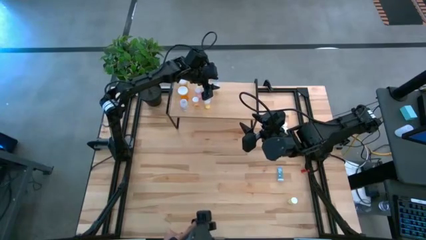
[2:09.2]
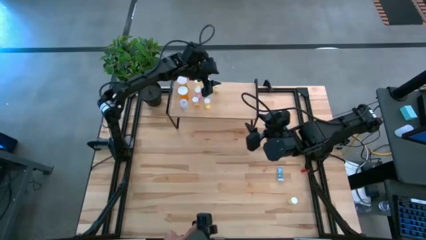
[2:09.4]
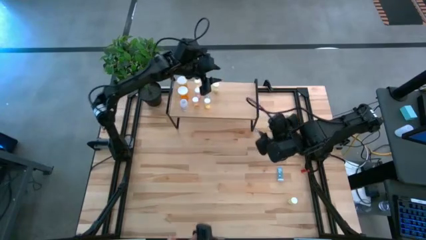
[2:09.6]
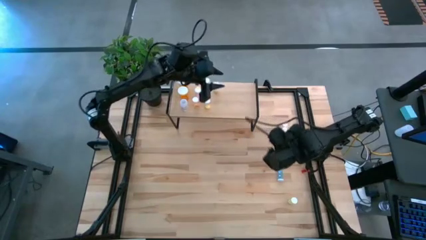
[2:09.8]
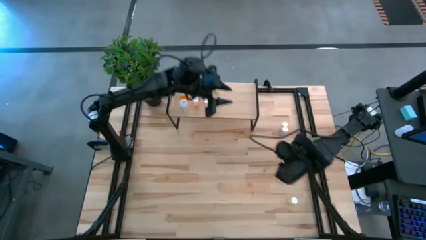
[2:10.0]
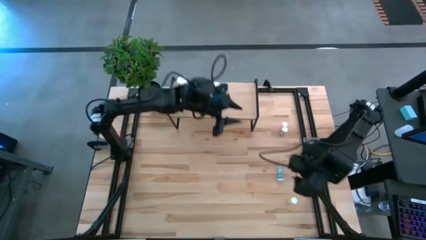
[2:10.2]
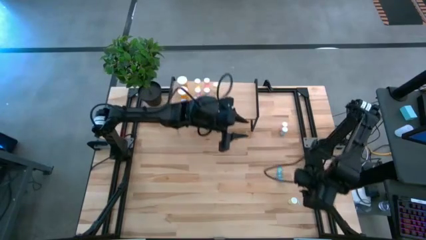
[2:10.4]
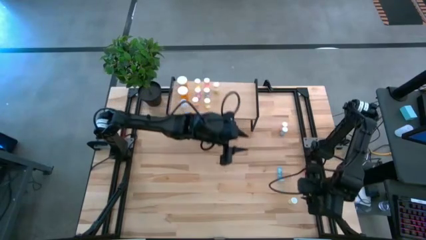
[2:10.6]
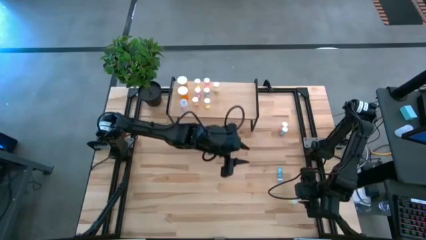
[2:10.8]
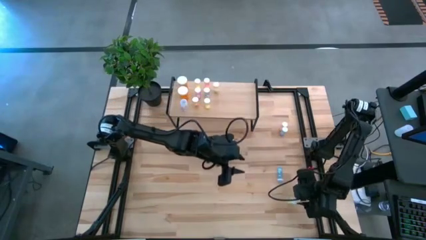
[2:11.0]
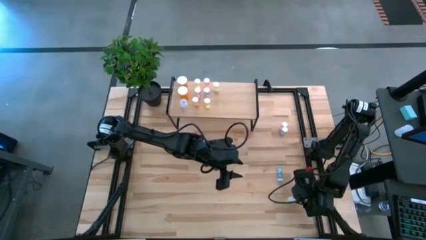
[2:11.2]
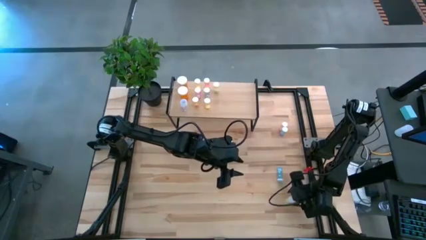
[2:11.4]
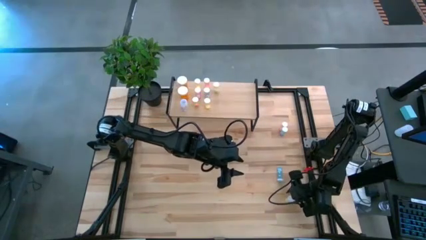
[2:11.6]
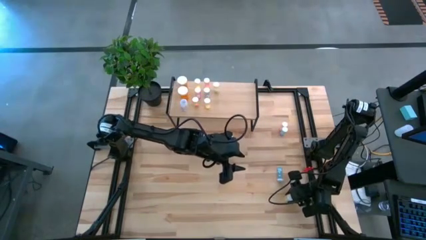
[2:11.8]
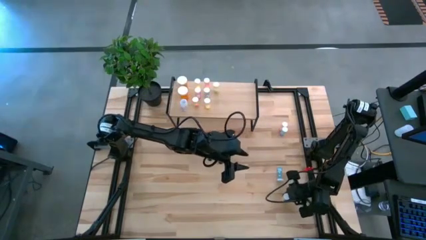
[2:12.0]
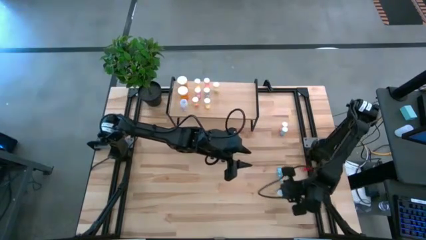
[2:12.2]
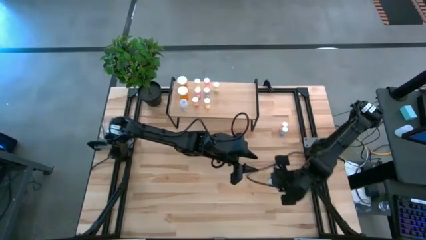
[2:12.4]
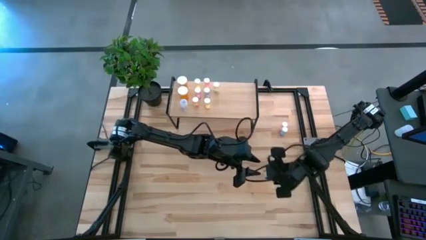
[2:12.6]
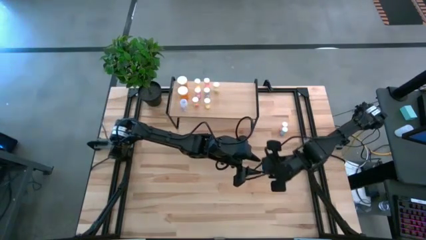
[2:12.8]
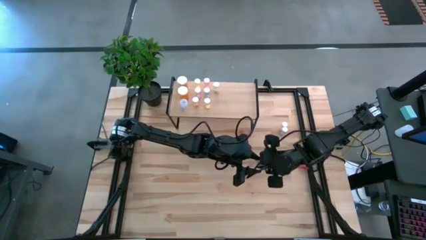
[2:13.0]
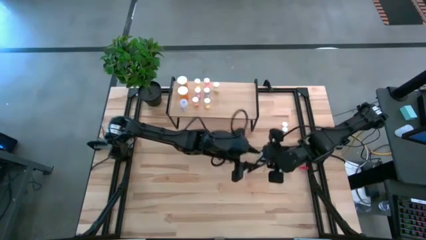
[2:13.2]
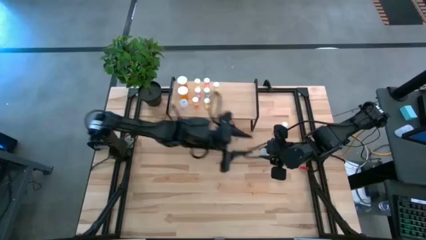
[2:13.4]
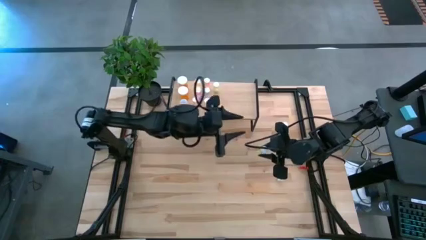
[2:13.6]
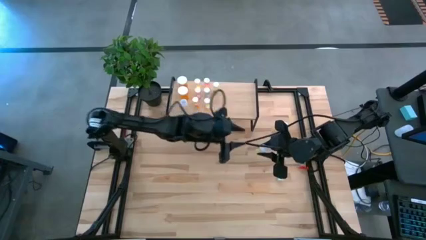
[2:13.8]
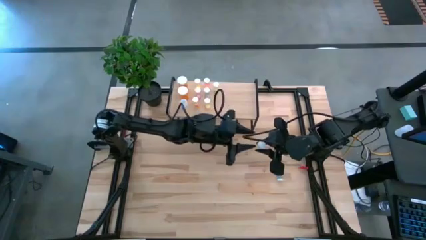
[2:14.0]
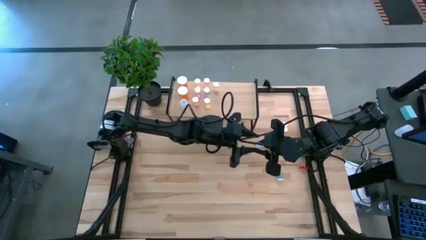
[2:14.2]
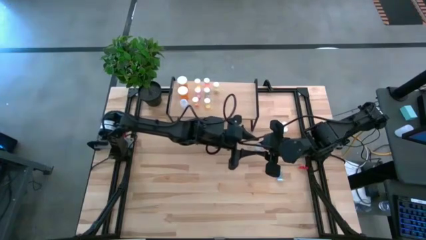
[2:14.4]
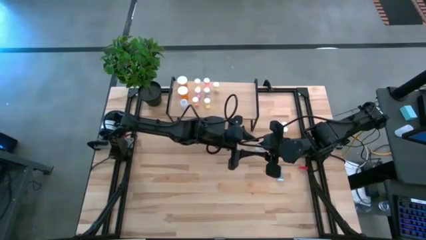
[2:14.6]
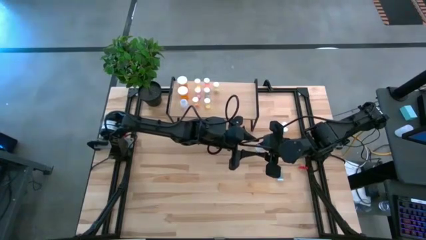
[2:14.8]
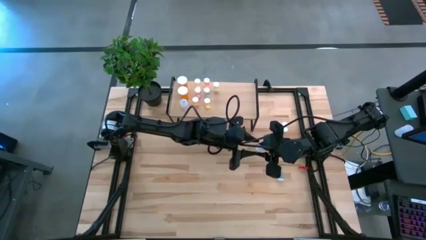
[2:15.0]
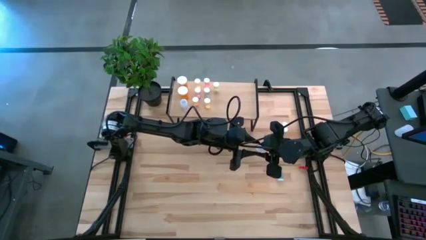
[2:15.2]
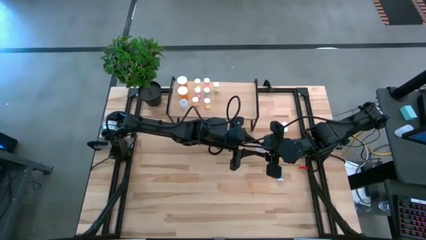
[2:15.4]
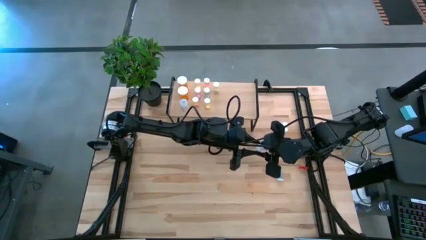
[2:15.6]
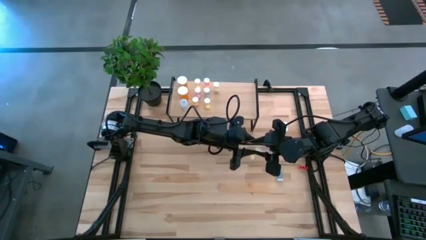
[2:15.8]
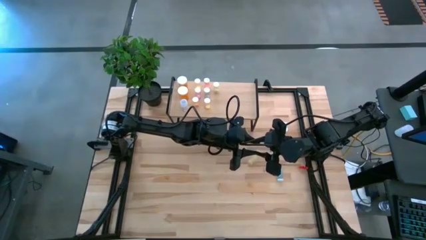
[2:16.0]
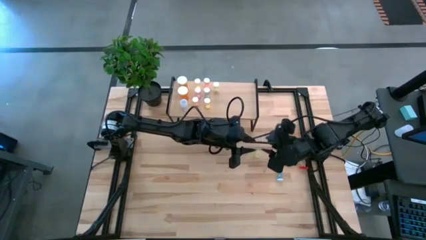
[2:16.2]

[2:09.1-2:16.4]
Task: Pick and place medicine bottles onto shelf by color
Put the yellow pill bottle on the shelf

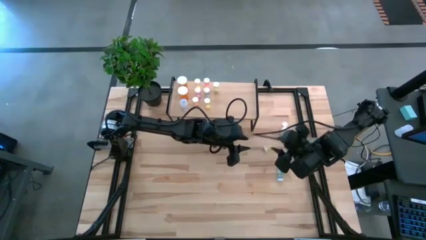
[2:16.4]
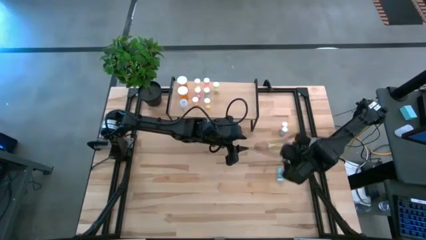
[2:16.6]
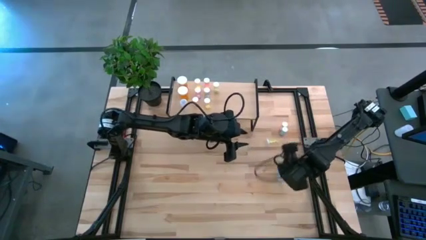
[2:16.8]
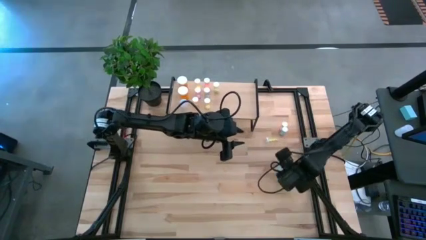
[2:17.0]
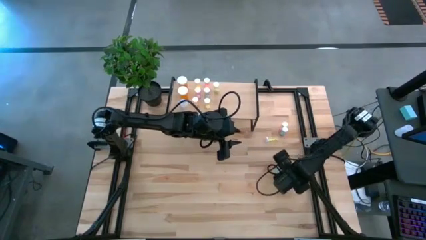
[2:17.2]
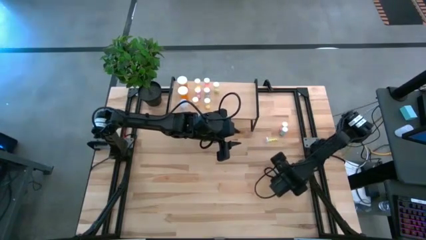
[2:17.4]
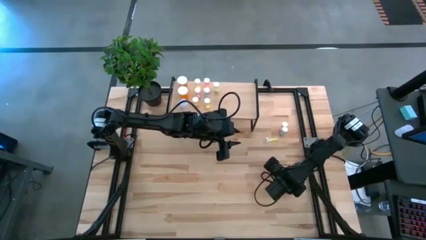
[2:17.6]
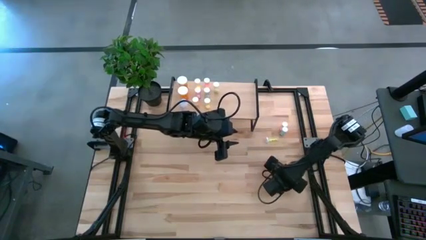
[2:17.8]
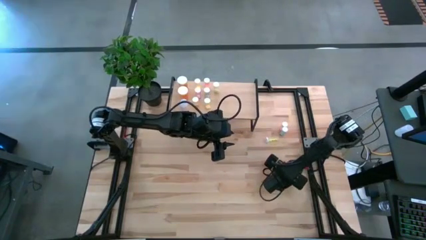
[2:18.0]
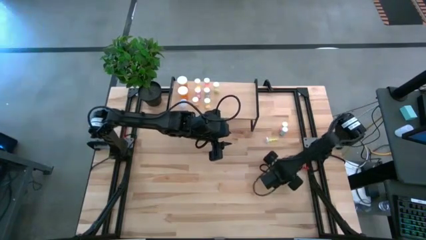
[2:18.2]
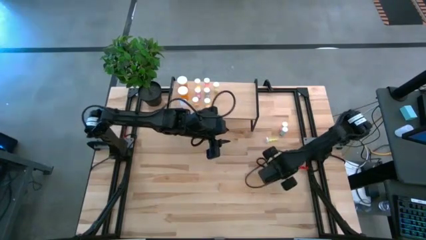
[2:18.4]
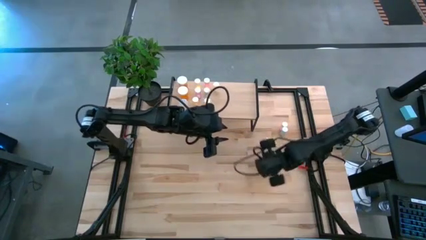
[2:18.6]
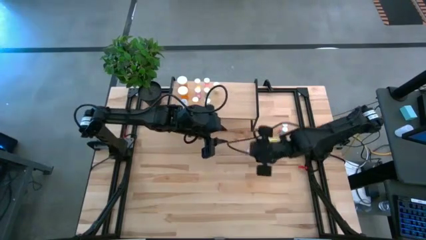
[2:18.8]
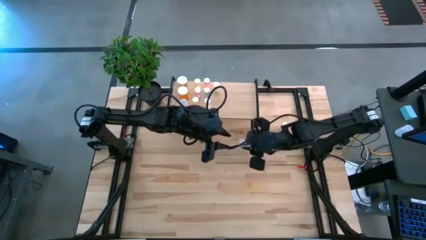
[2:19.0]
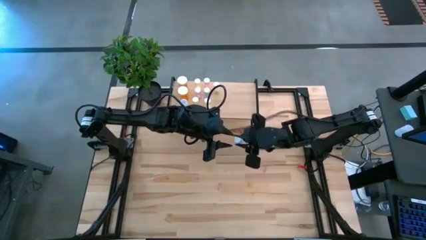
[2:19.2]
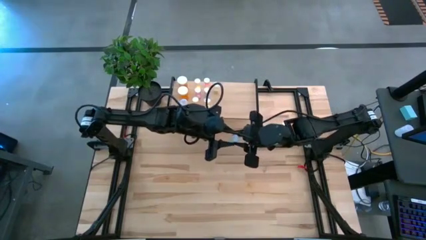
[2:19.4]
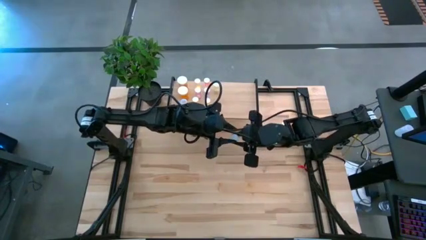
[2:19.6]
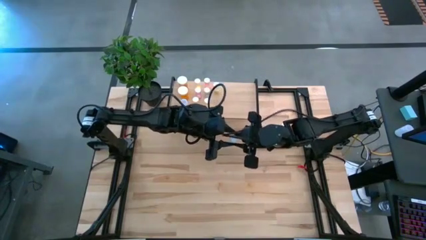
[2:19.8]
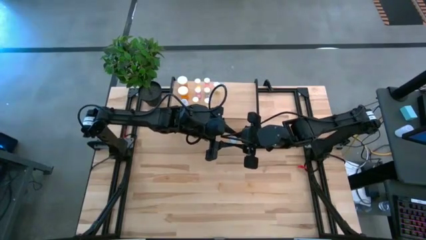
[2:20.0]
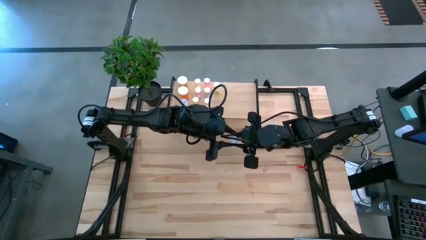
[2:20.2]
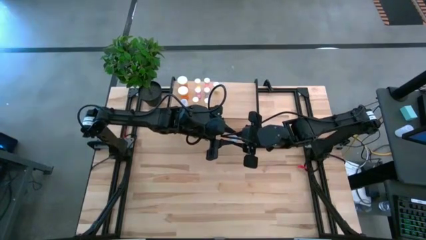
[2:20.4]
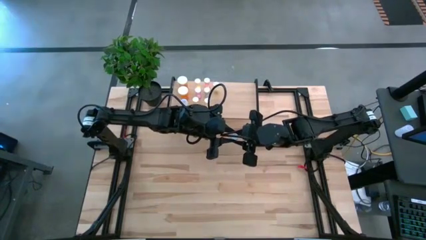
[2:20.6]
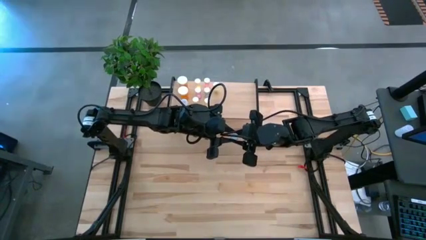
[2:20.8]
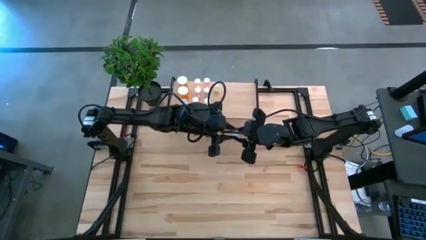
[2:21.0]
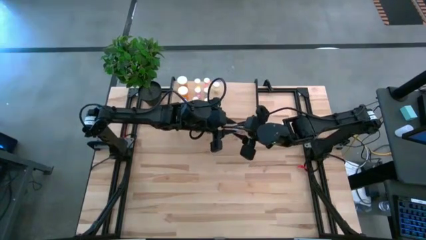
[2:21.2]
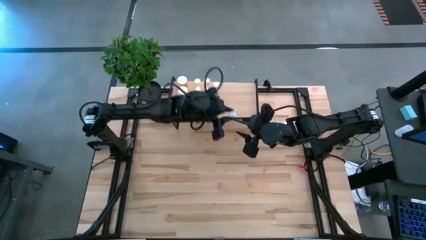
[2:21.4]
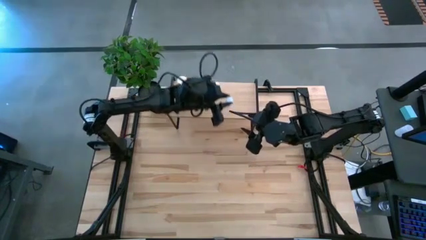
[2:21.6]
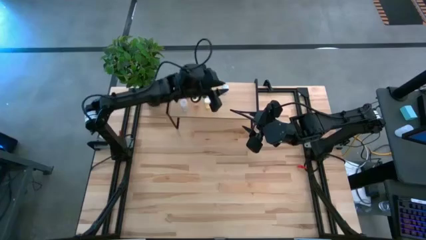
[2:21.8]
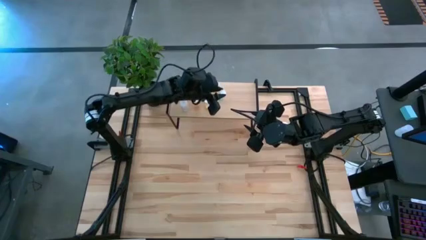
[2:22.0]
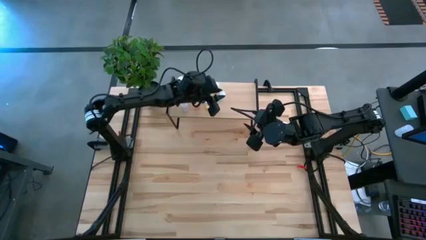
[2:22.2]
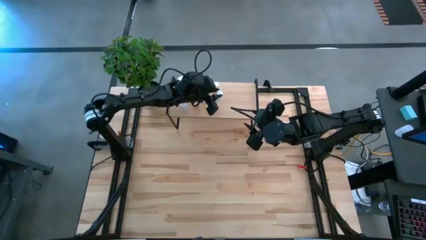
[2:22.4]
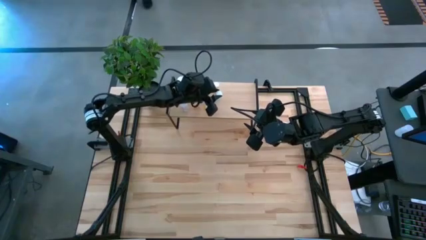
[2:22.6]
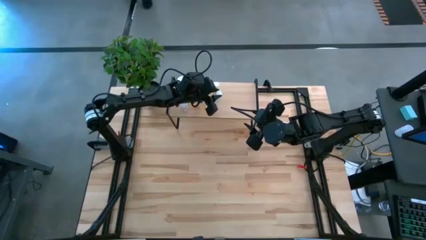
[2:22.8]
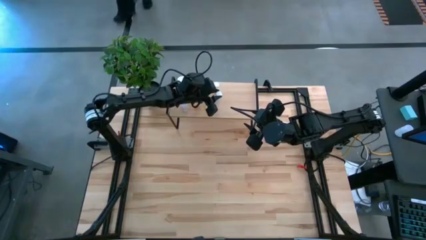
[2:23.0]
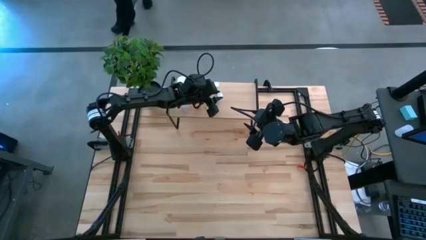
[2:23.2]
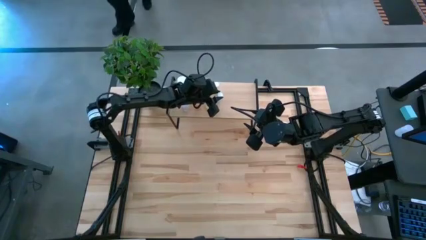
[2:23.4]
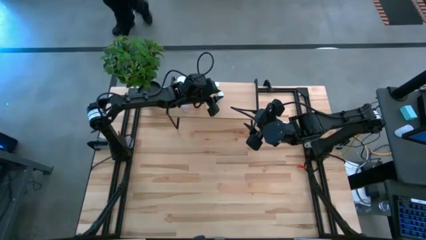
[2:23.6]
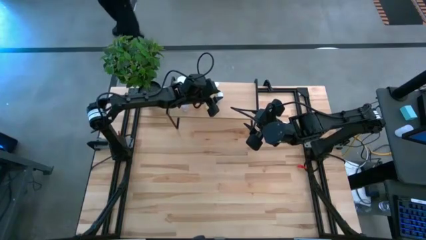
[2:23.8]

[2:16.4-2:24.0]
Put the blue pill bottle on the shelf

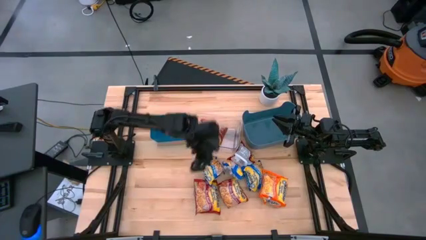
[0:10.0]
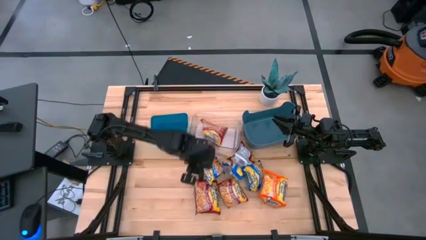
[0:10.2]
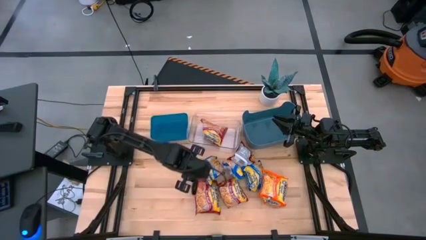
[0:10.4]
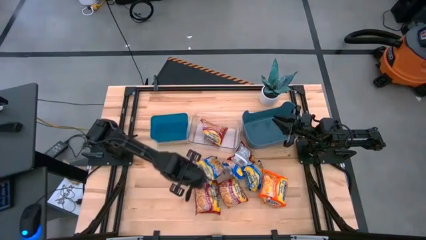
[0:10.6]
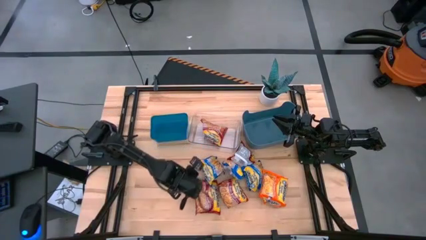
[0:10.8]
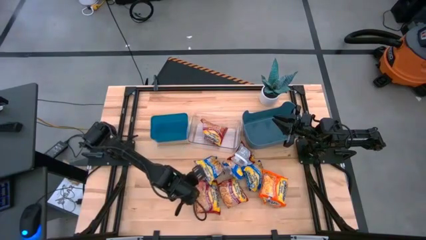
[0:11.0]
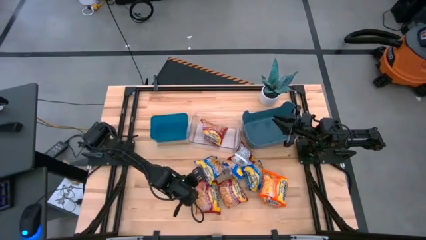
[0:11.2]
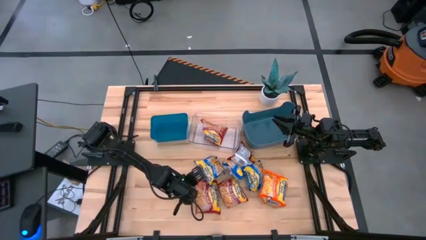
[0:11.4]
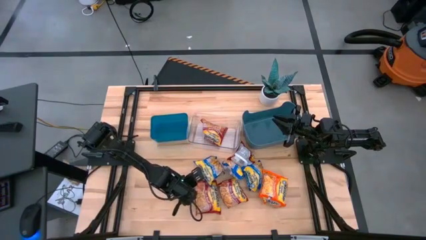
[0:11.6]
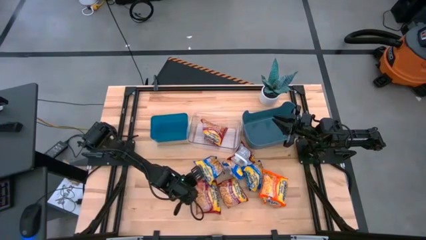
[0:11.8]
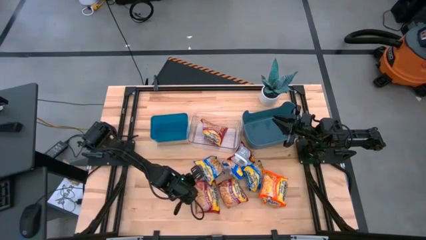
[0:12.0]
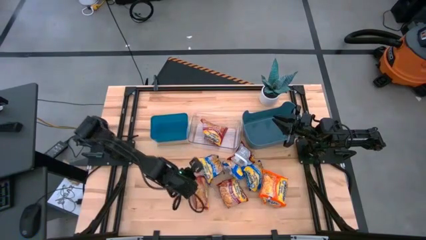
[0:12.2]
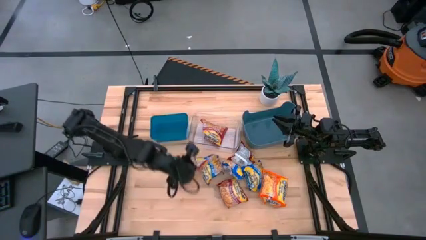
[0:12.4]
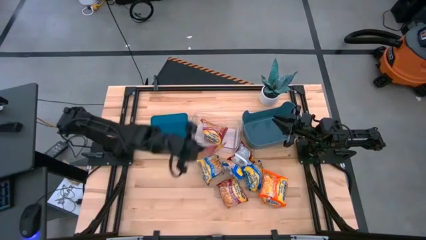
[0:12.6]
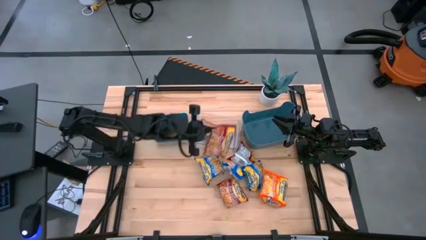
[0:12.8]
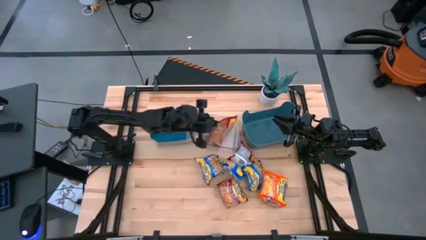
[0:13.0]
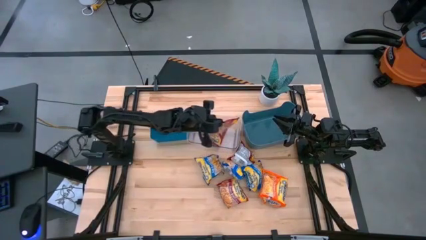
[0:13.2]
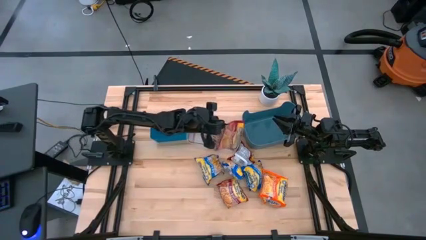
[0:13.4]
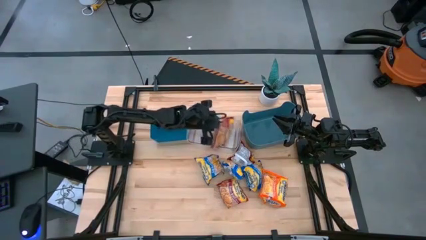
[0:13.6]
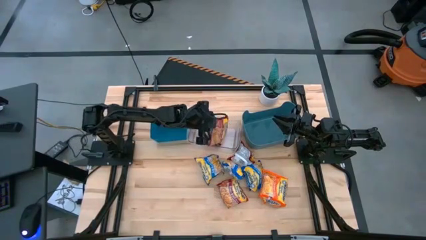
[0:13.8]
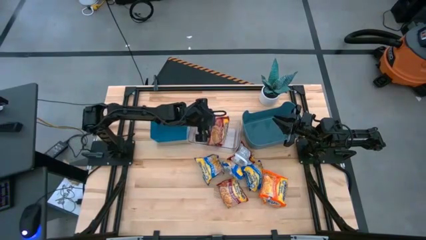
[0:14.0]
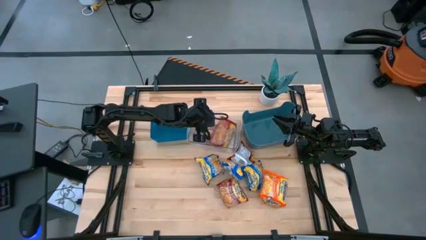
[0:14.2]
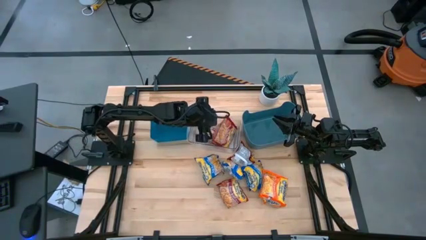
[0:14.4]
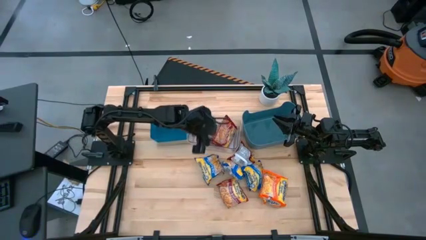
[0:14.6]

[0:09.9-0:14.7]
Task: Sort Maruchan noodles
Put the red noodle pack into the transparent bin
